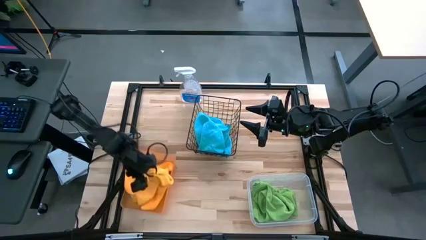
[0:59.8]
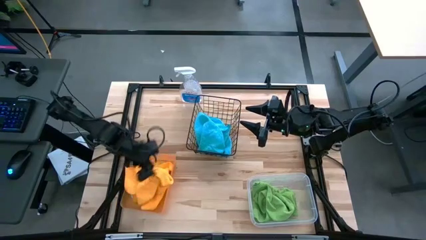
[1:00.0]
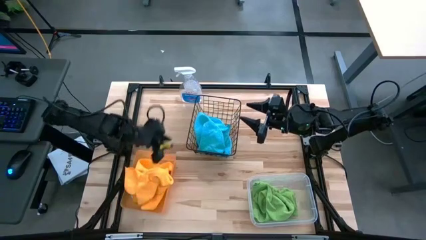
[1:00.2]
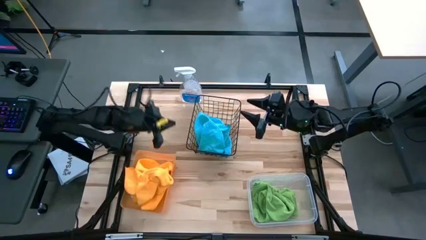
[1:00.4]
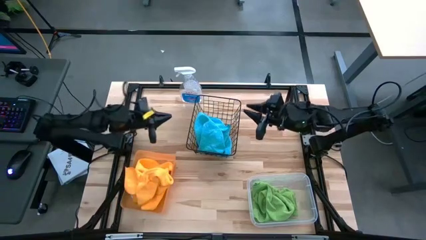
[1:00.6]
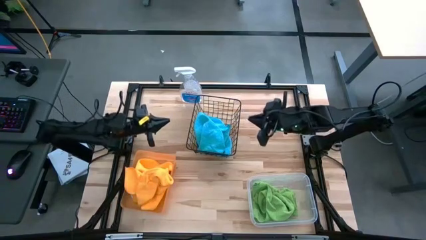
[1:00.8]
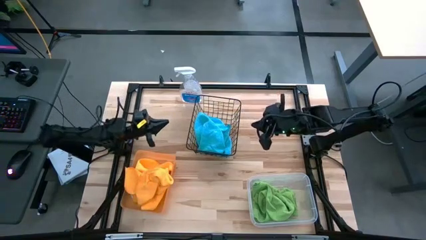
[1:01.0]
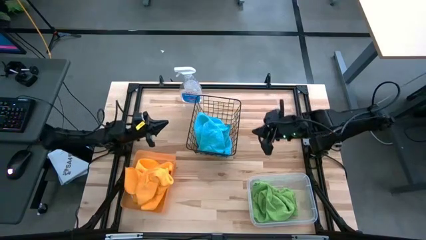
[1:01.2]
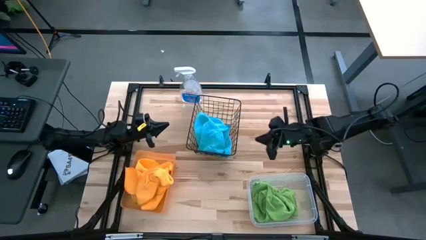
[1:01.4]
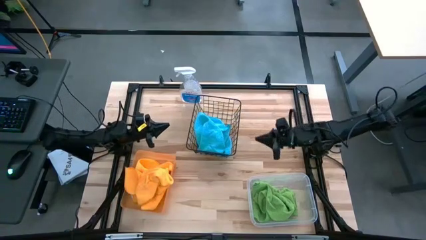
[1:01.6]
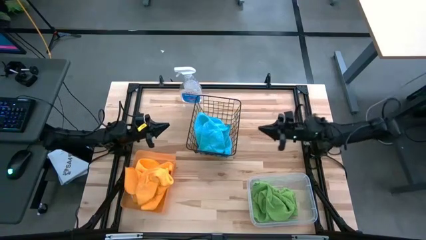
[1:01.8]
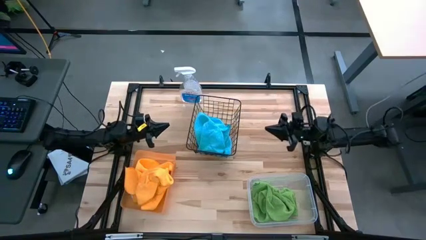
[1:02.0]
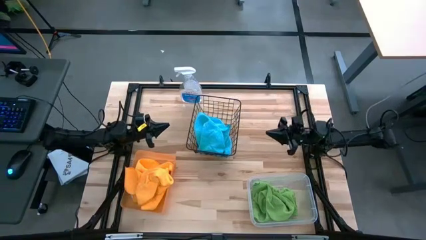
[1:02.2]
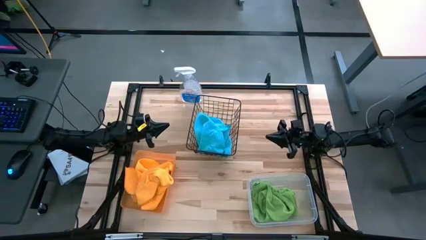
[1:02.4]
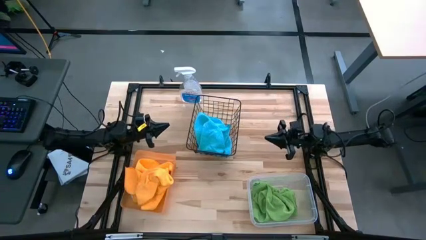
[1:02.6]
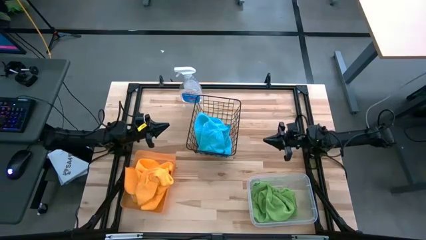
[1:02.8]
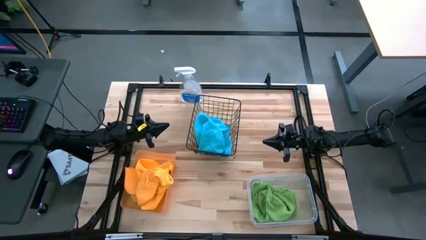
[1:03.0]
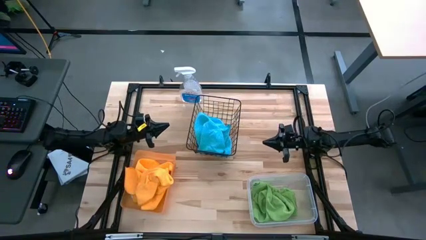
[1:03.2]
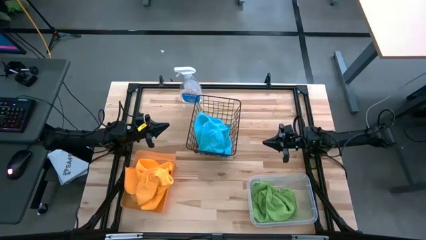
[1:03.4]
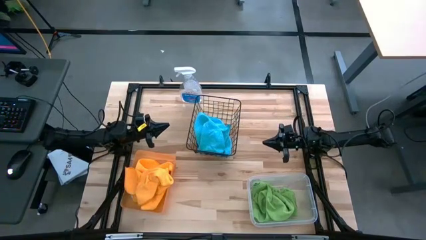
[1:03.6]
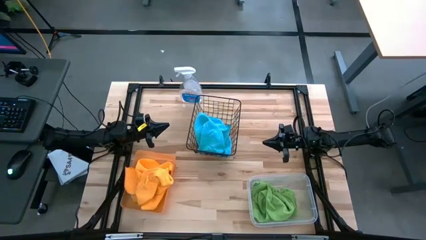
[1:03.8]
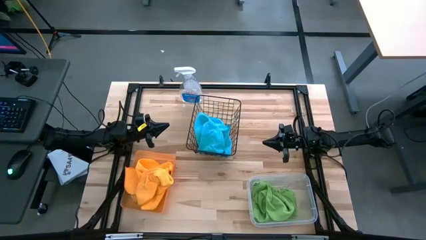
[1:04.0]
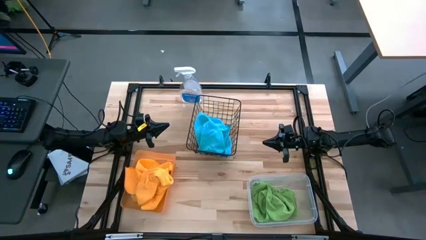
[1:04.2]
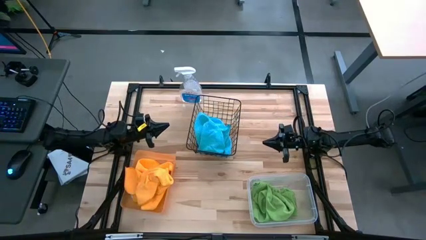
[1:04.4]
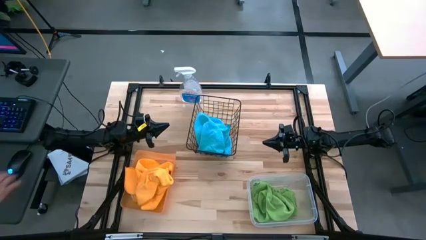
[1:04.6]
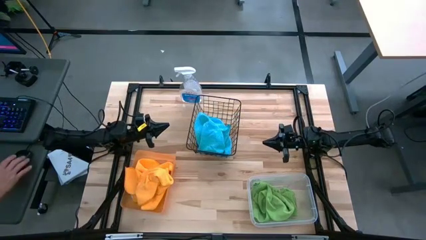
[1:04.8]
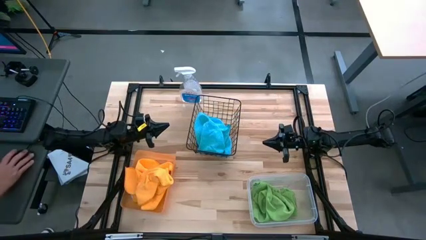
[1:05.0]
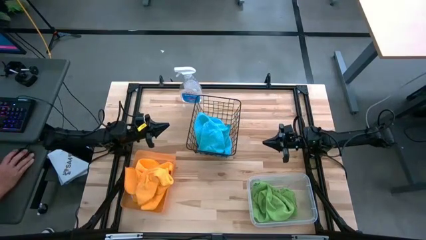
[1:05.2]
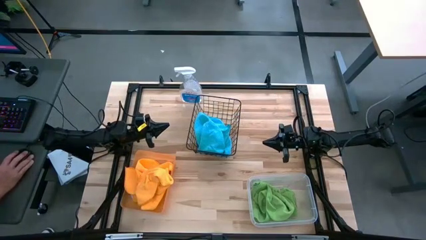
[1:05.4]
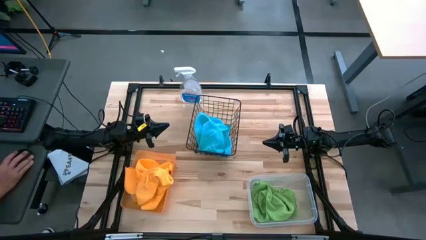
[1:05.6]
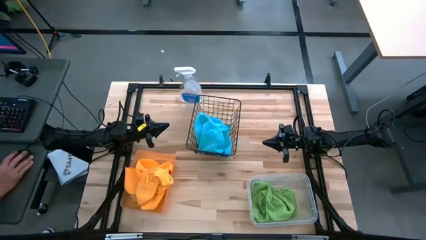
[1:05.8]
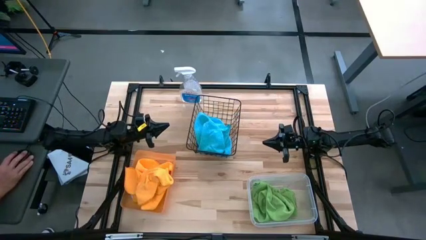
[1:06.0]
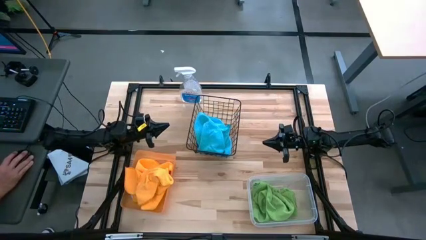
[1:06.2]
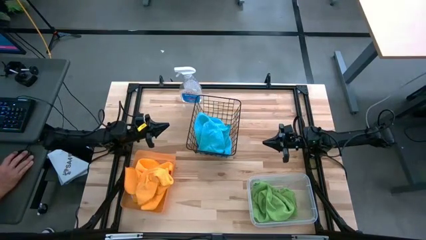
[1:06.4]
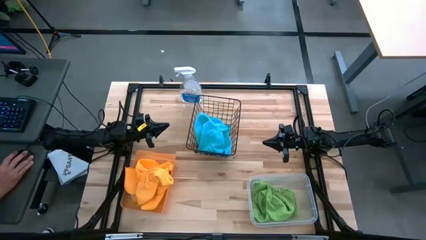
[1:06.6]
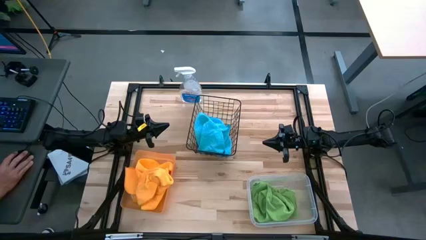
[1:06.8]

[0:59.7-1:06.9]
Task: Sort microfiber towel by color & place in baskets
Return to Home Position

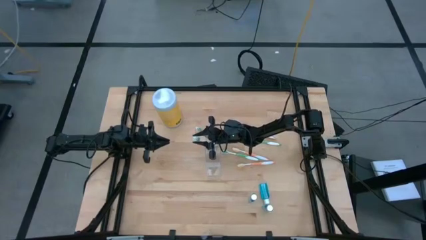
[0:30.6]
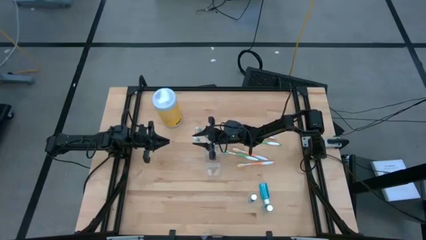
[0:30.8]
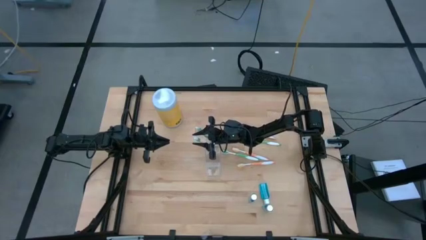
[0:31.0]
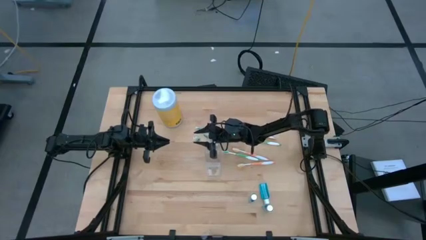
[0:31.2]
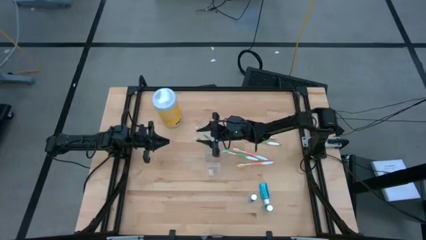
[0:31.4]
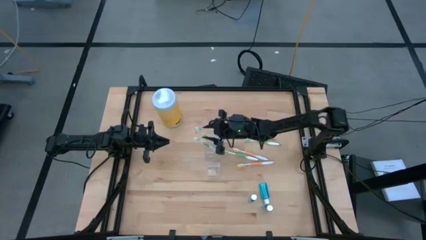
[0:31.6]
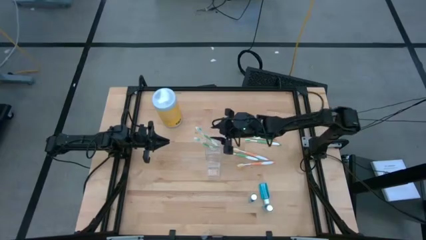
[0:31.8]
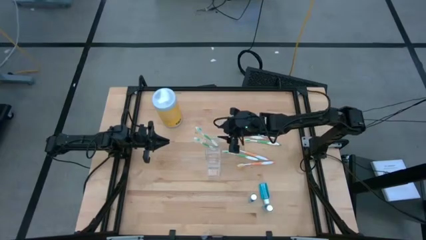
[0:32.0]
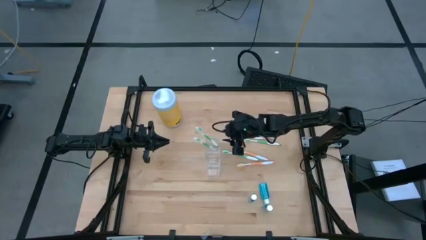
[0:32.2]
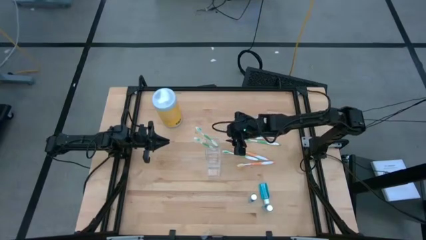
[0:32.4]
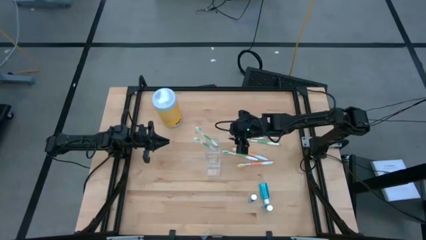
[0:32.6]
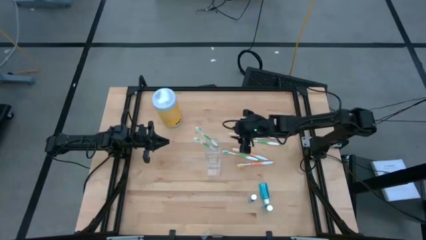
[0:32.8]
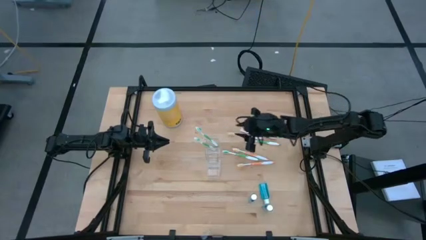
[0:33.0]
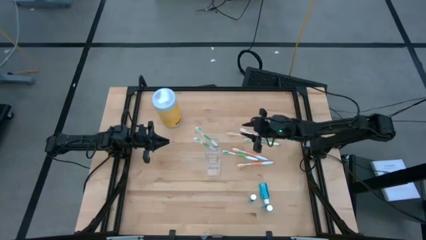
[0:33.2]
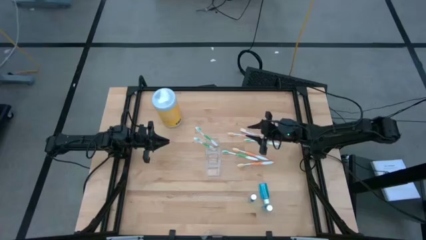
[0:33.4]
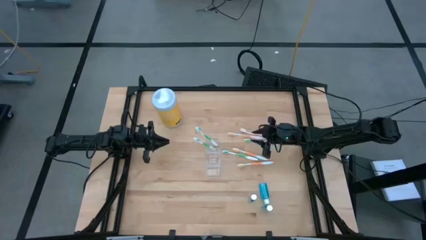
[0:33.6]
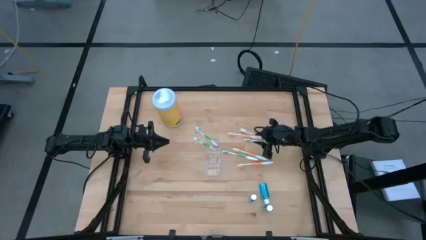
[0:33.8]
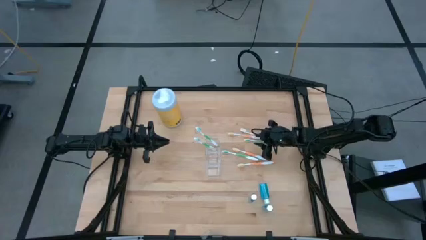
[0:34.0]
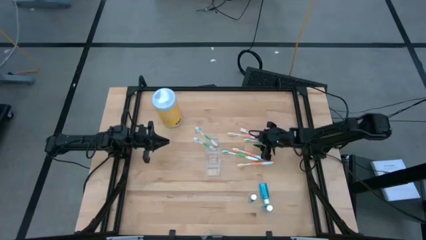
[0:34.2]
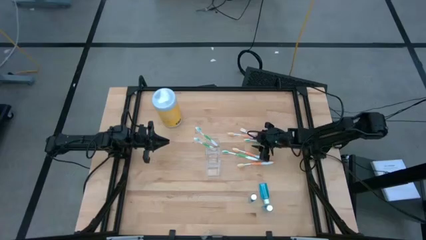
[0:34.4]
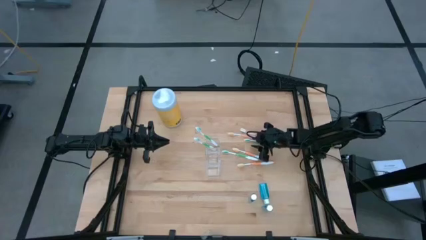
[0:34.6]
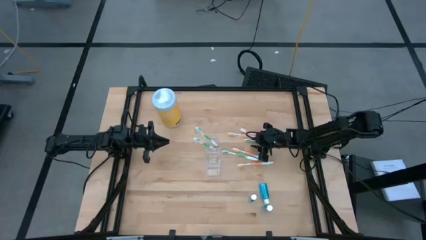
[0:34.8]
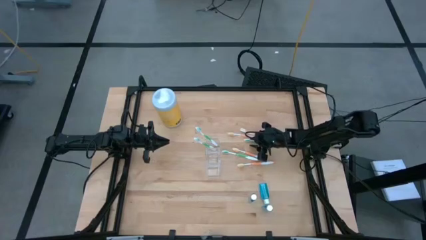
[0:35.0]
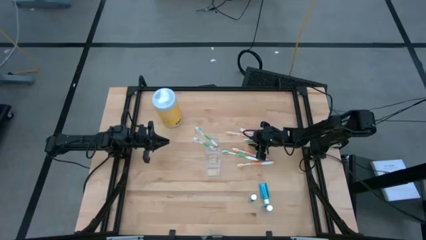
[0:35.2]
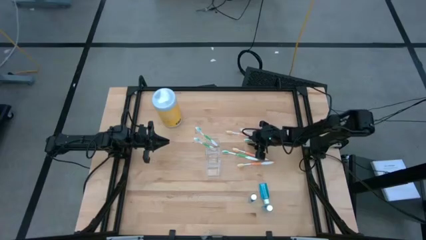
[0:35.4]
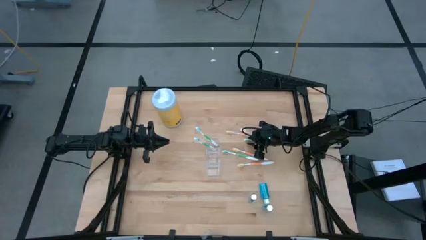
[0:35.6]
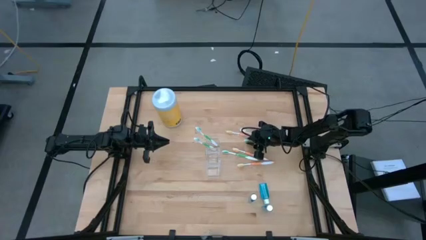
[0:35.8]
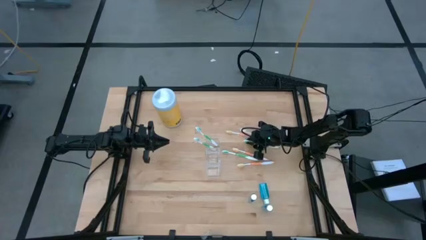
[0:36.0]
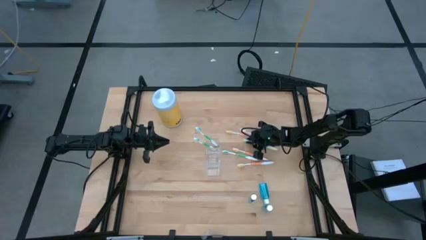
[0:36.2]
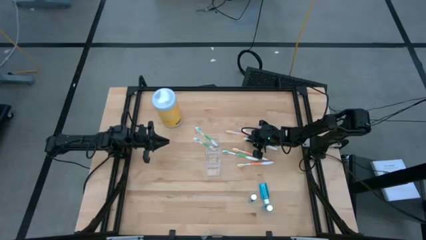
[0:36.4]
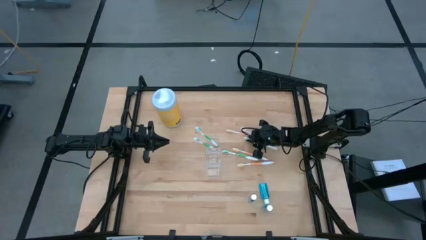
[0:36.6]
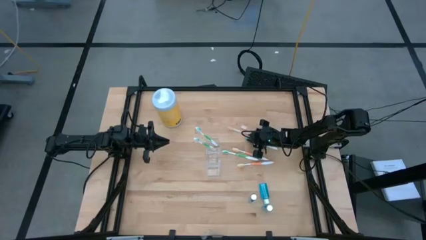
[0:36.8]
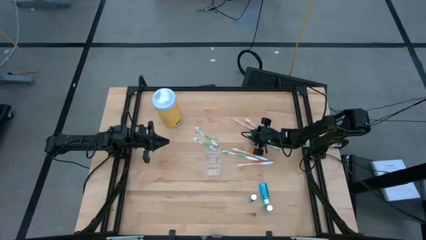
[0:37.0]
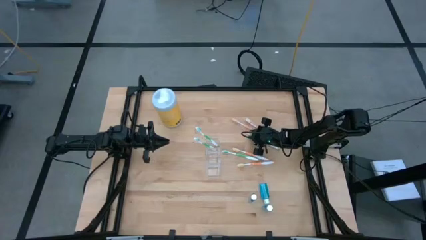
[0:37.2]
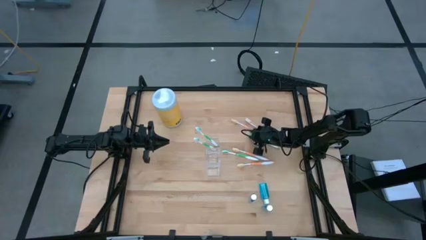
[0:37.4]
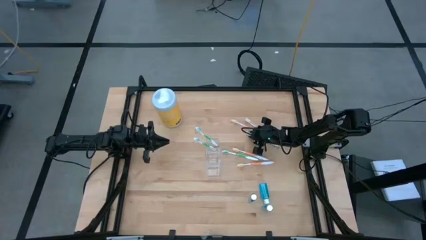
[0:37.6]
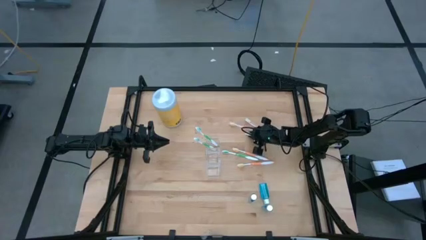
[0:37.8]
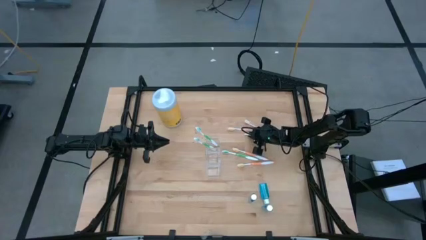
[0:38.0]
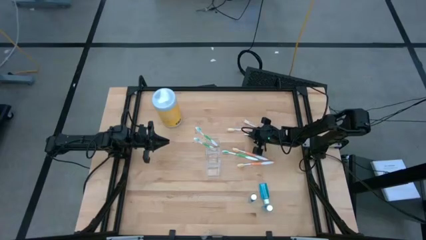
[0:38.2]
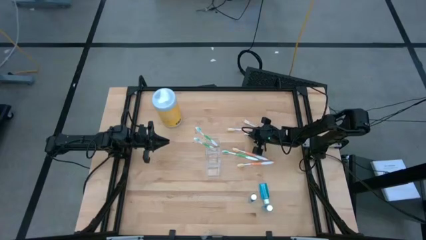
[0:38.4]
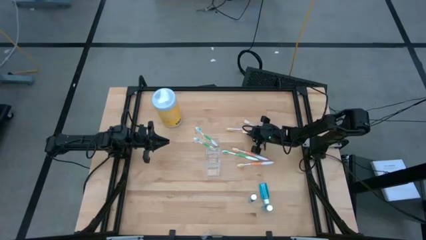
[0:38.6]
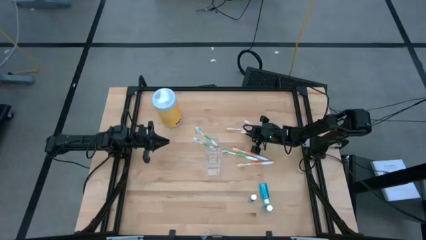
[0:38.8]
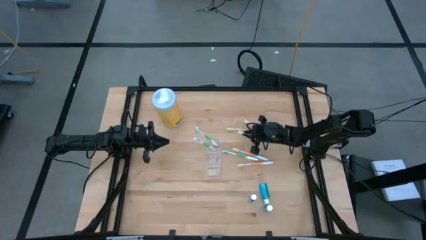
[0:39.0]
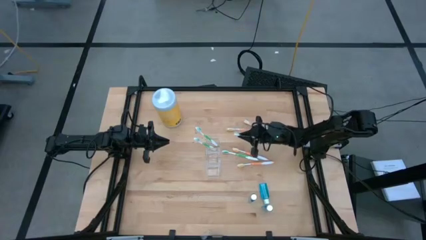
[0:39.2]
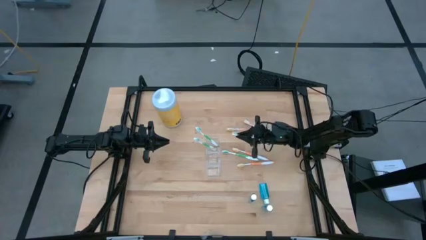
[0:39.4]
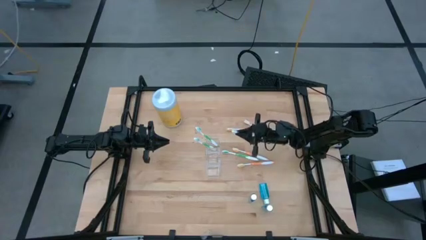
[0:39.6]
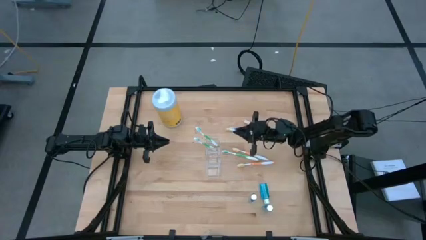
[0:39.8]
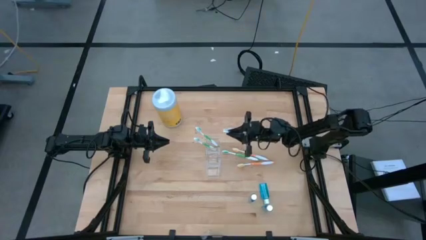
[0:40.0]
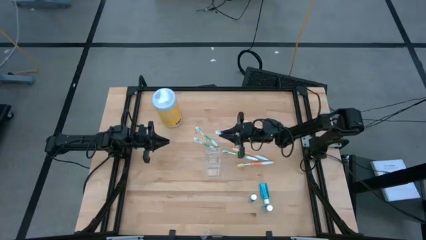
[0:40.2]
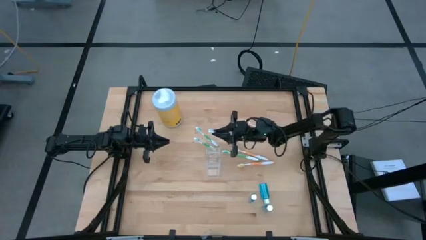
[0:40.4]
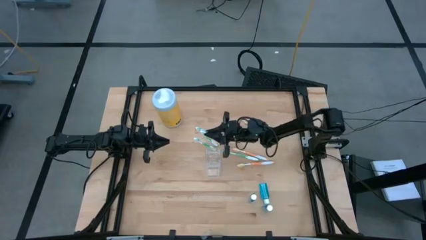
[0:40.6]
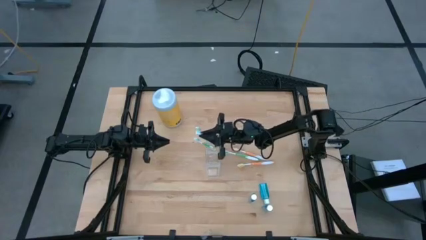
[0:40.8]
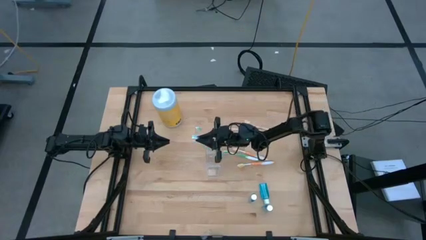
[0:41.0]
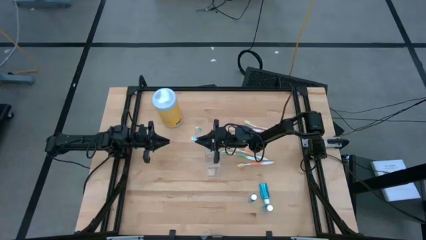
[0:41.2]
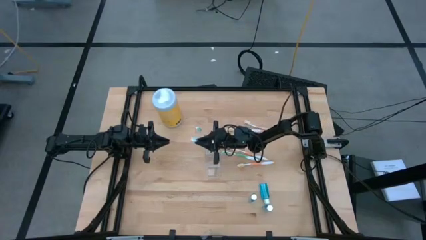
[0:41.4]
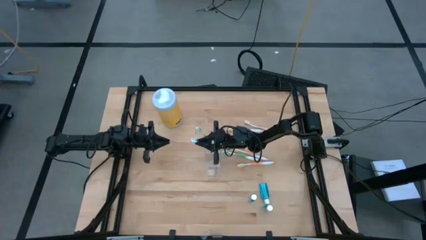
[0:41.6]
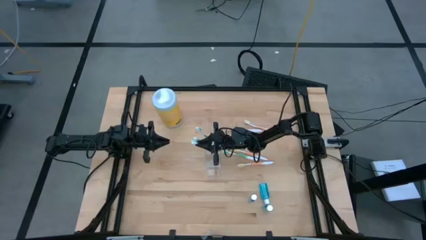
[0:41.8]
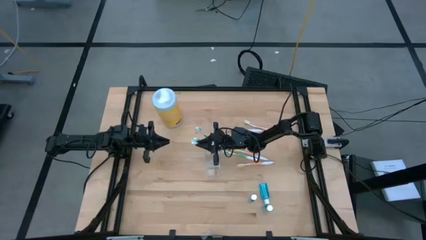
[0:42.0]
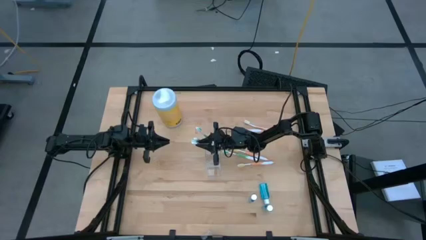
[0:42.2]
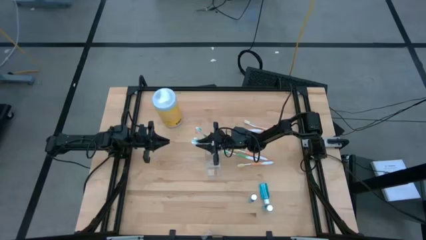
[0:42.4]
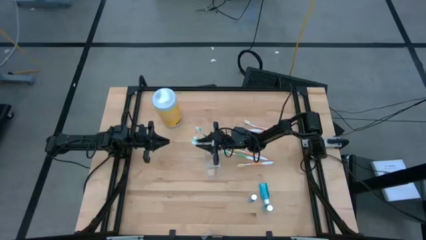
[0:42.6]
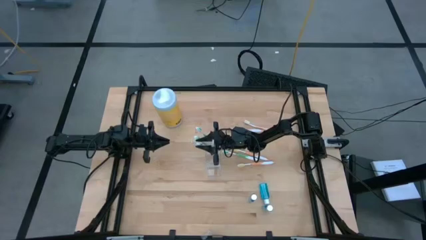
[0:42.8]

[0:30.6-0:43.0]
Task: Pick & Place toothbrushing station
Put the green toothbrush into the transparent organizer
